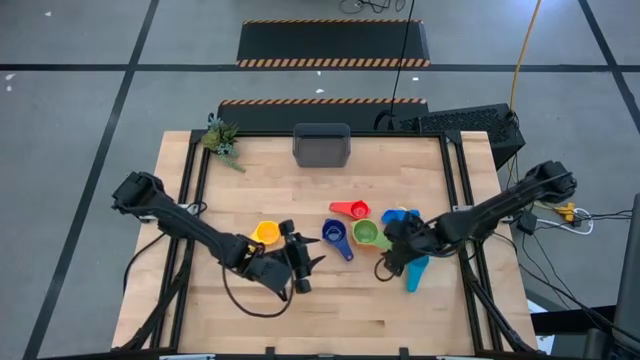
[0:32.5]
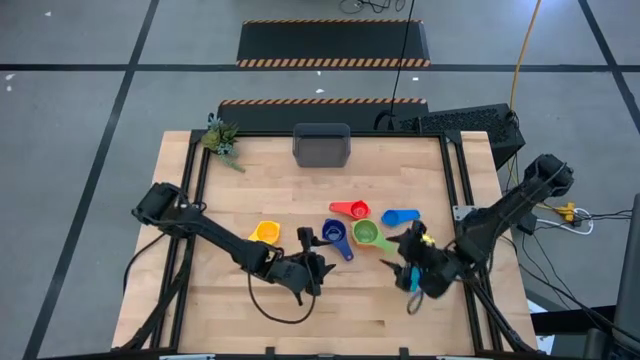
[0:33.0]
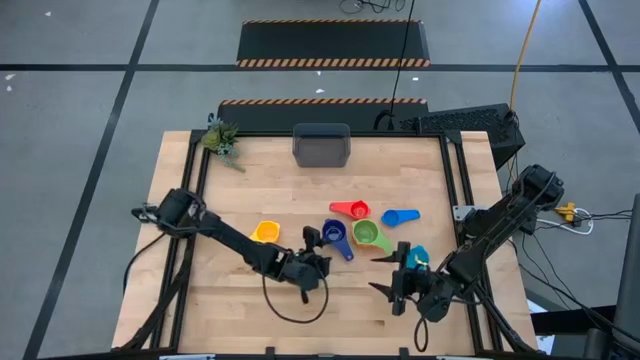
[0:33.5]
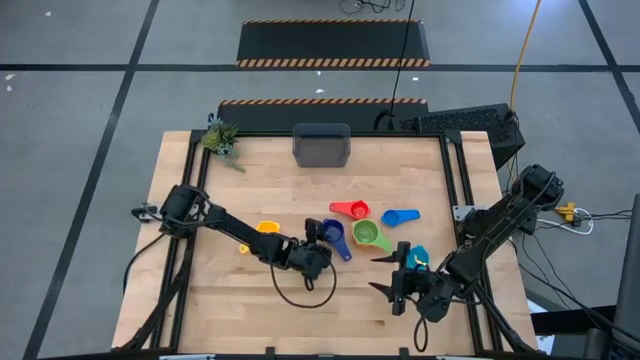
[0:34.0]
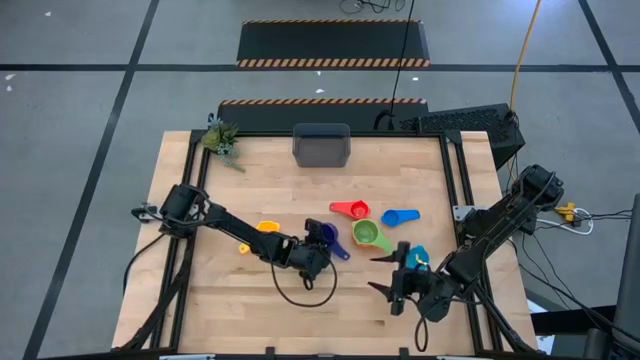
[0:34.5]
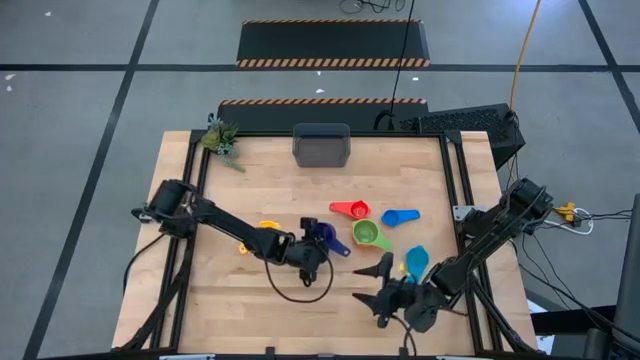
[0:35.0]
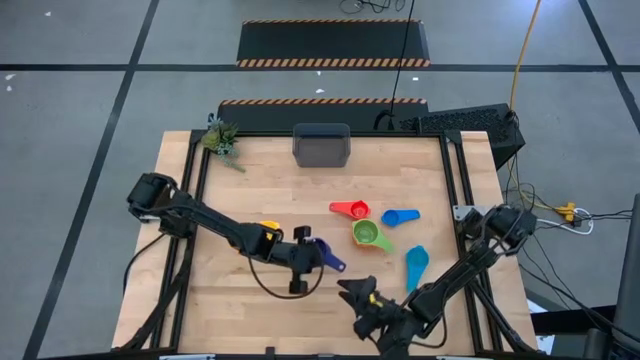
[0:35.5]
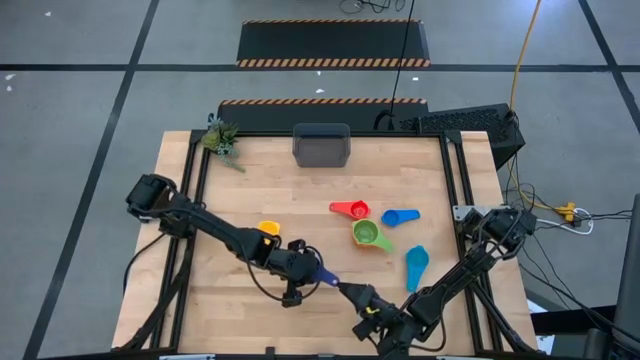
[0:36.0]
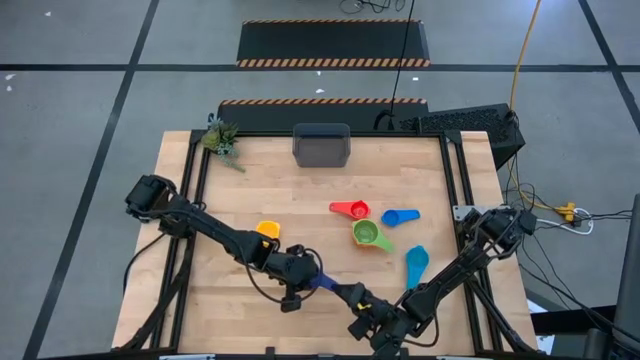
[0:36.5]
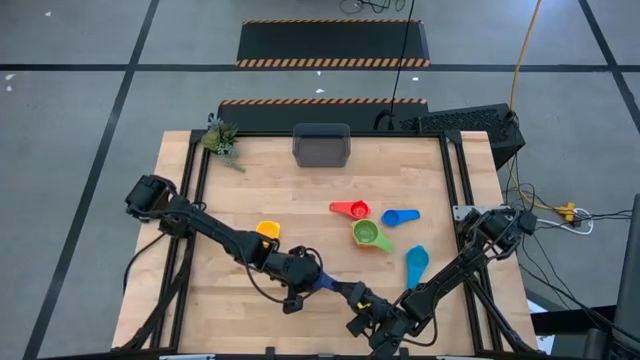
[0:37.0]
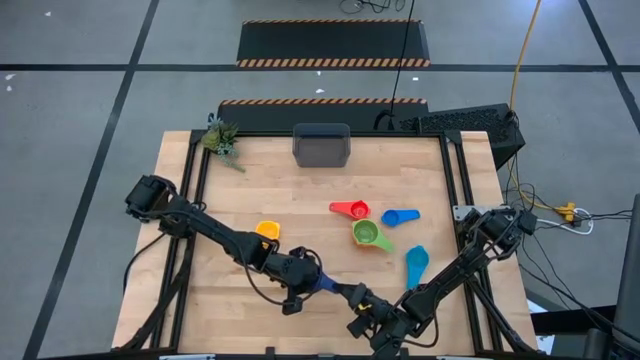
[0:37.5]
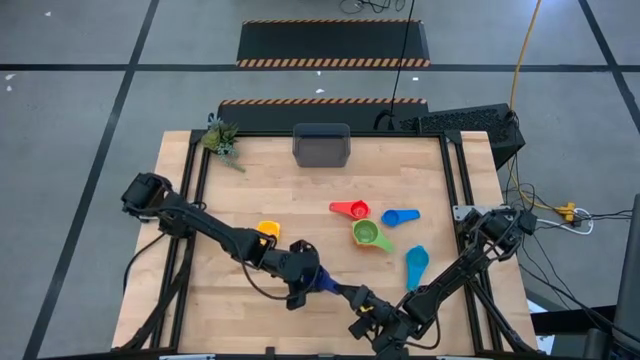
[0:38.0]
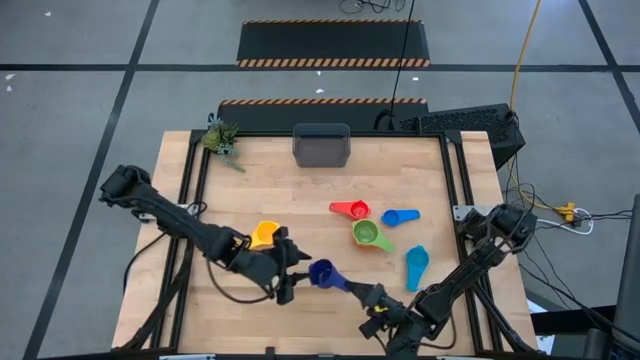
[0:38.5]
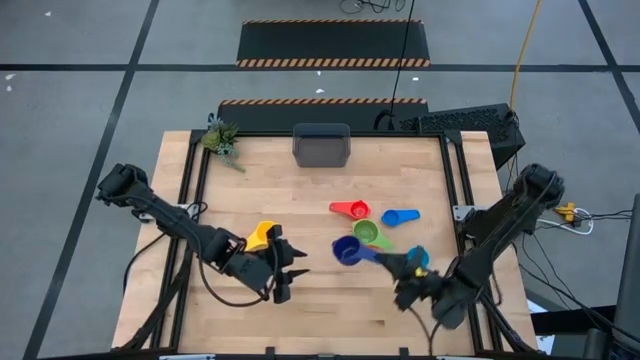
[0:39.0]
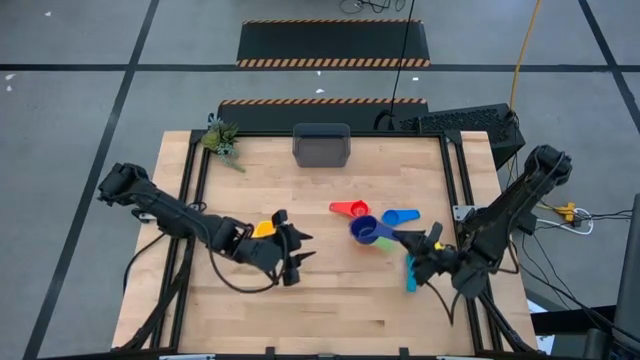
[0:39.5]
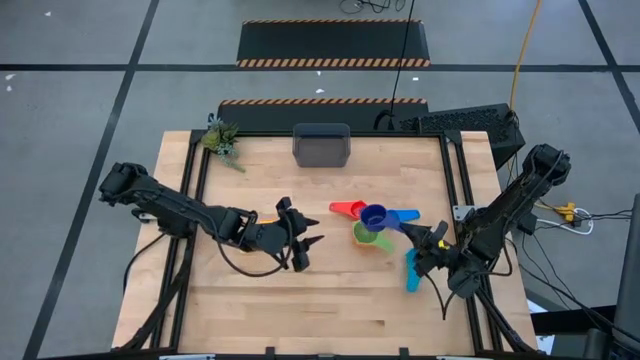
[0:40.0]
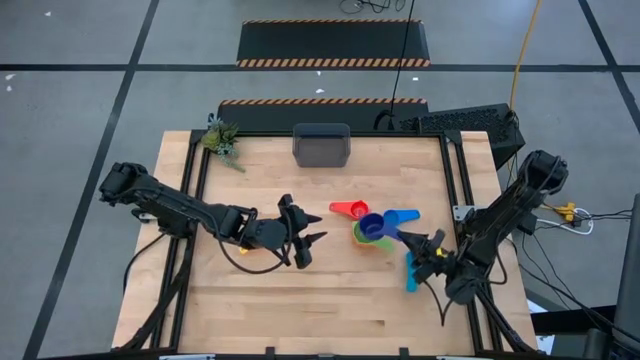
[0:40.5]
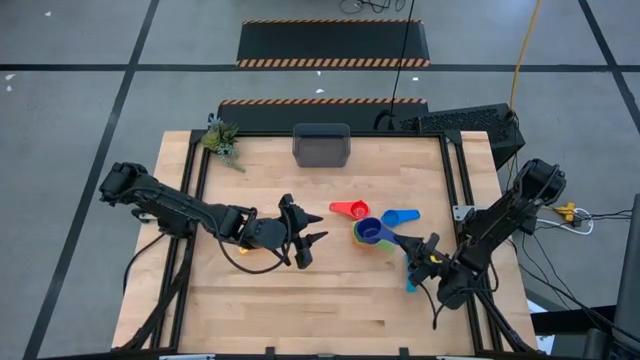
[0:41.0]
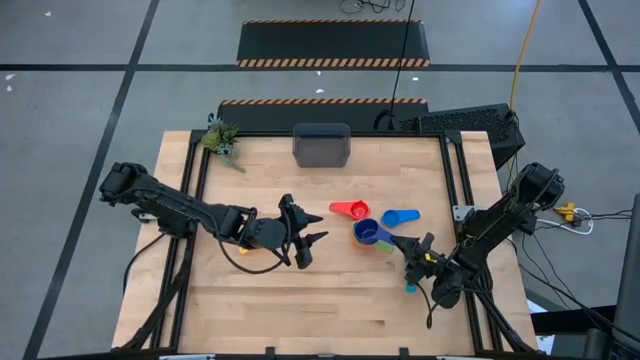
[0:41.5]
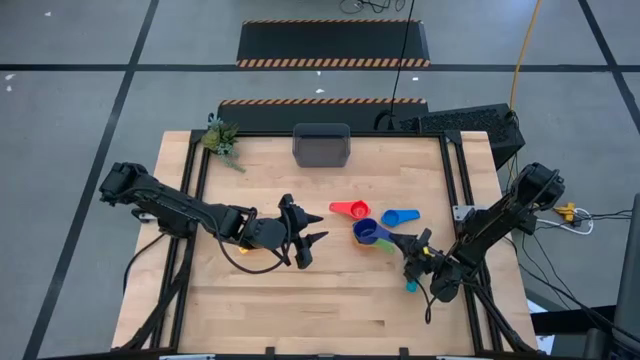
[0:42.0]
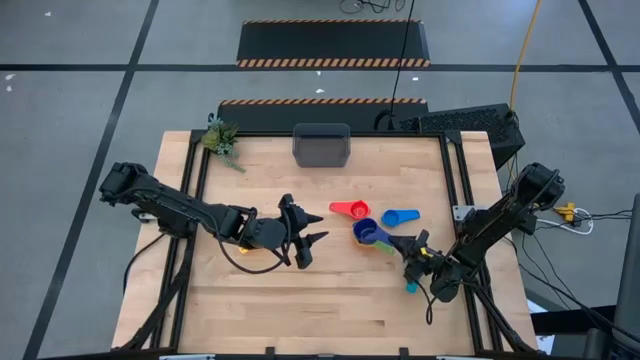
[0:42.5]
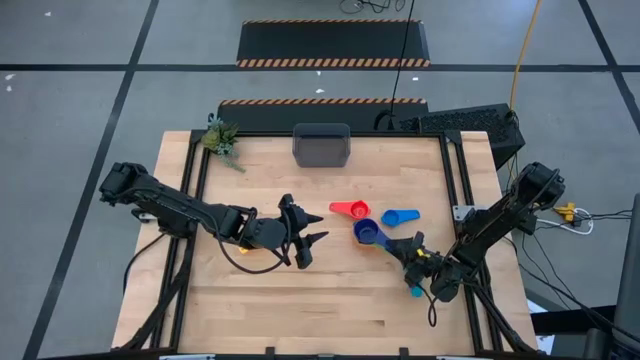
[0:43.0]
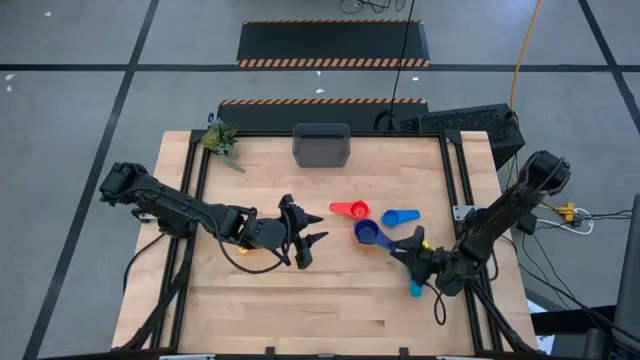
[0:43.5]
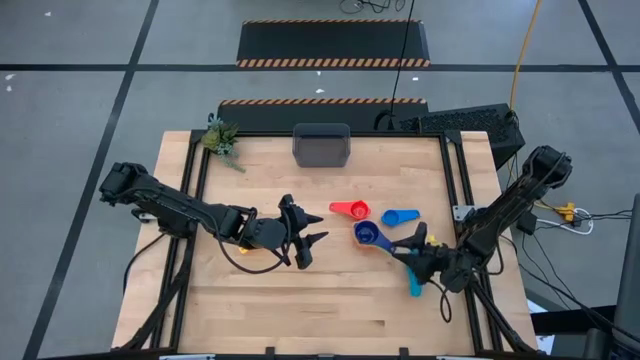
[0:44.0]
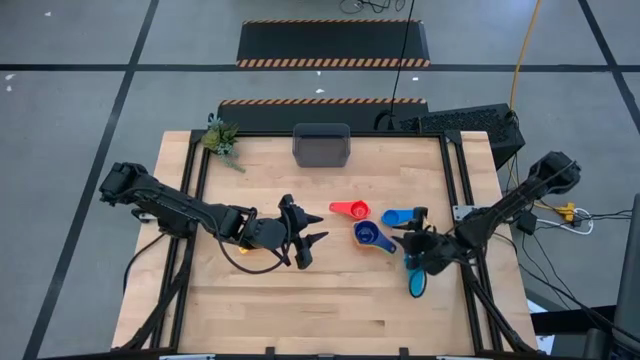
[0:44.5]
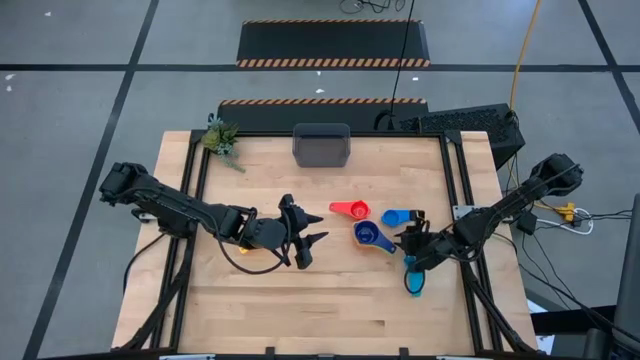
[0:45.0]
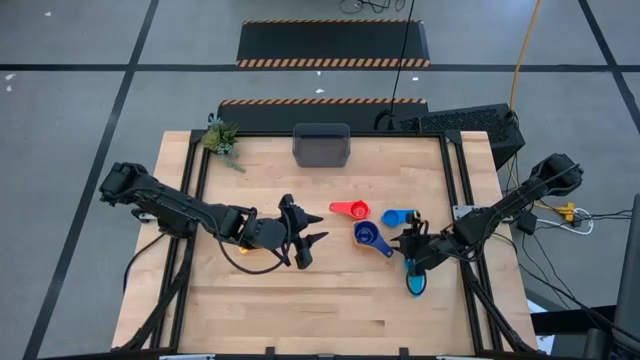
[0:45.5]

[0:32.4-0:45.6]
Task: Nest measuring cups in basket
Stack the dark blue measuring cup on top of the green measuring cup
